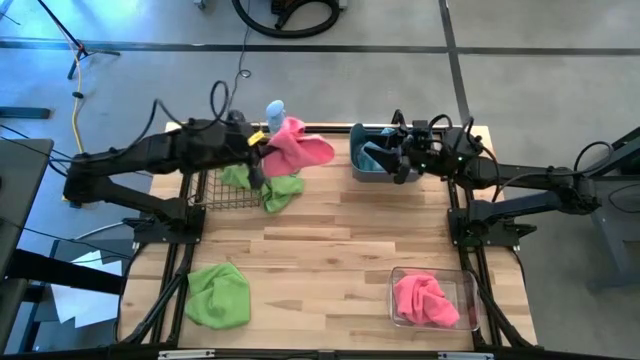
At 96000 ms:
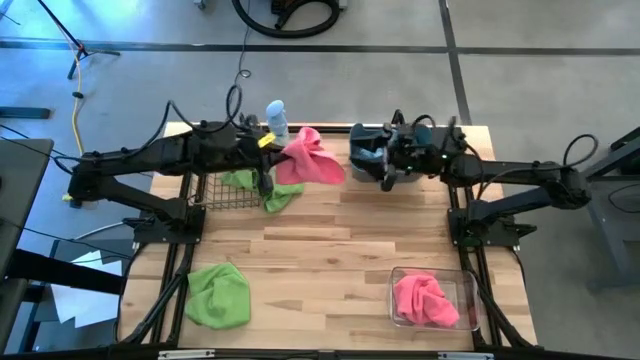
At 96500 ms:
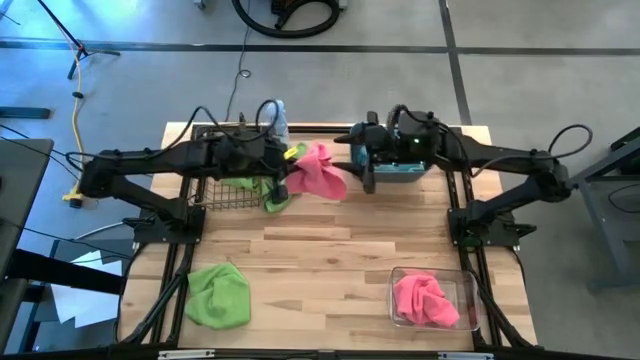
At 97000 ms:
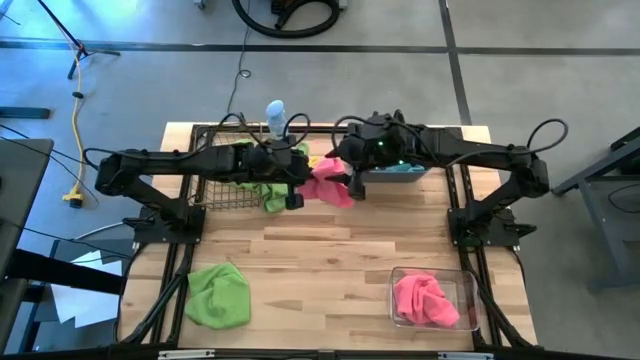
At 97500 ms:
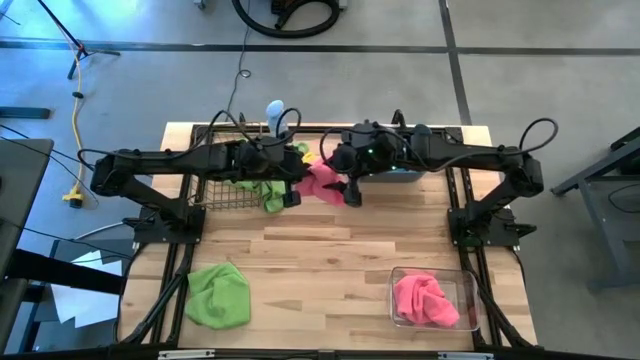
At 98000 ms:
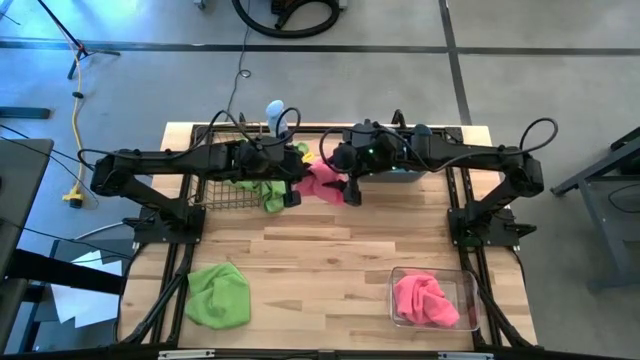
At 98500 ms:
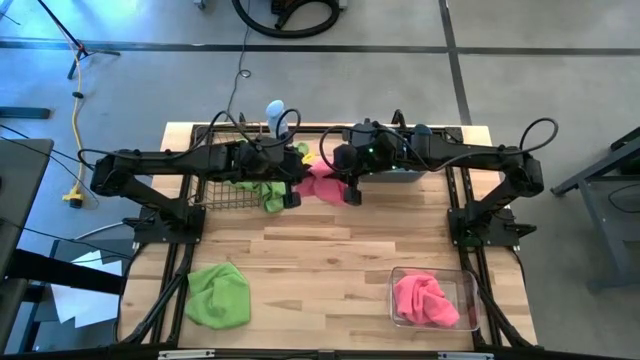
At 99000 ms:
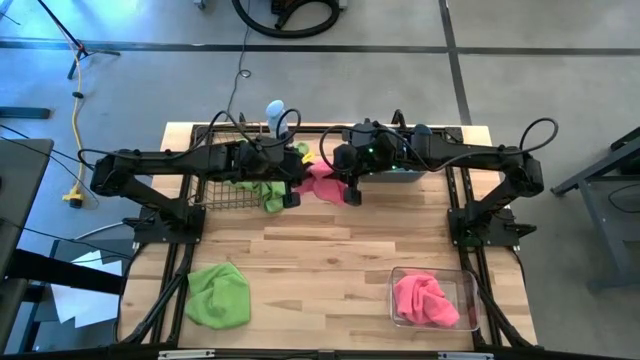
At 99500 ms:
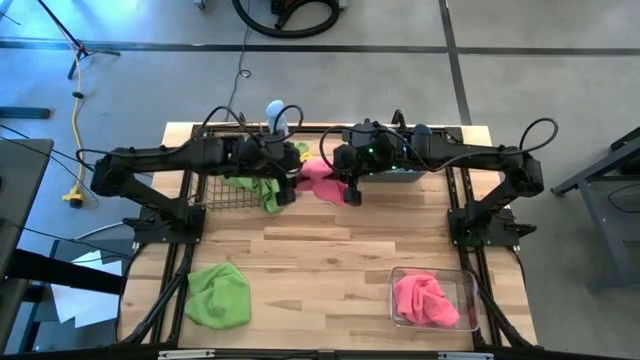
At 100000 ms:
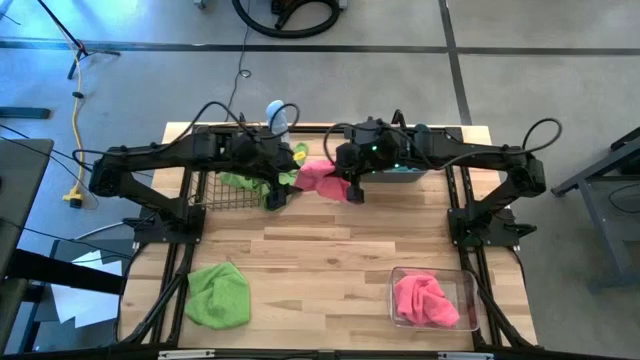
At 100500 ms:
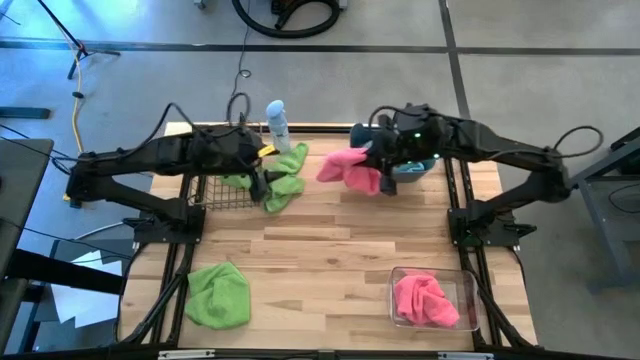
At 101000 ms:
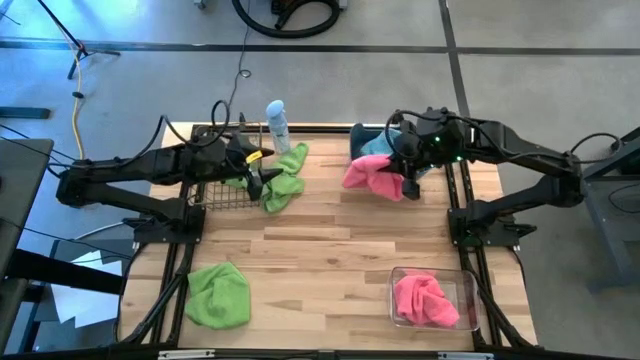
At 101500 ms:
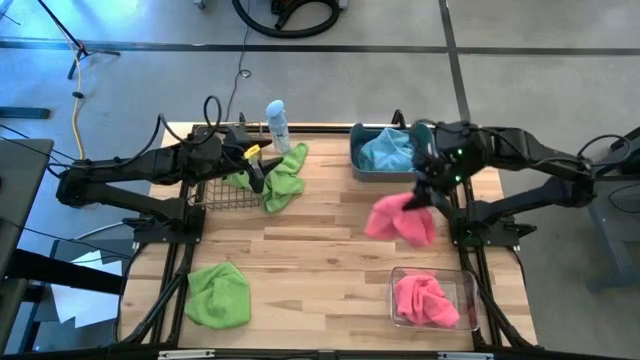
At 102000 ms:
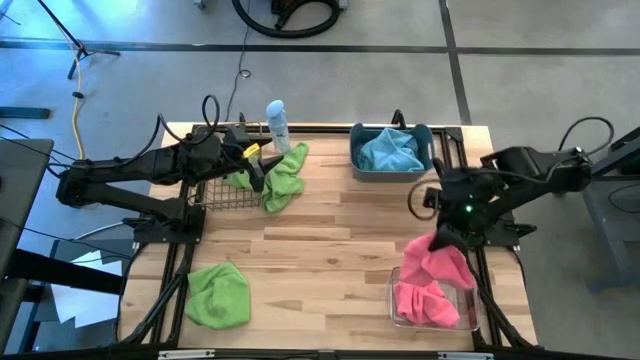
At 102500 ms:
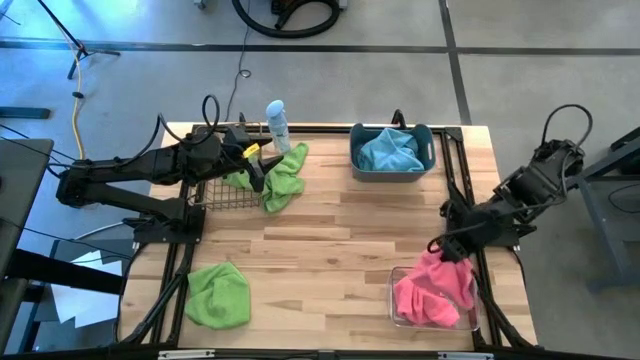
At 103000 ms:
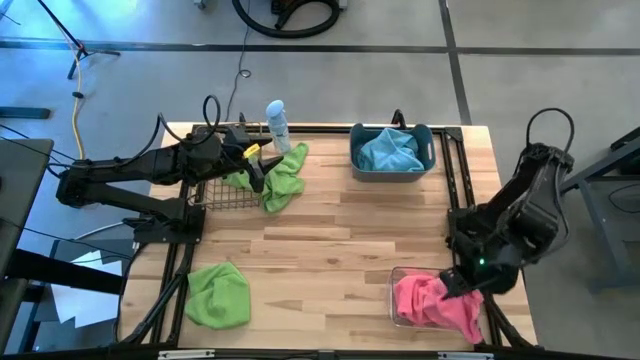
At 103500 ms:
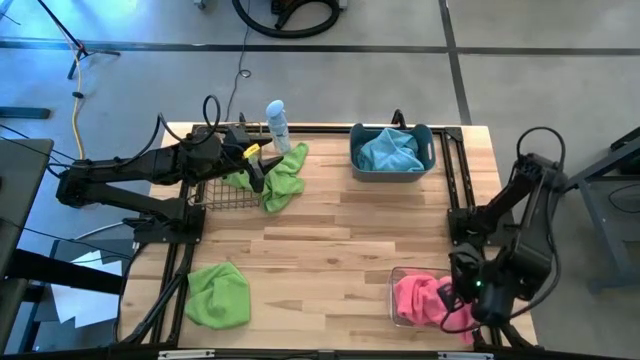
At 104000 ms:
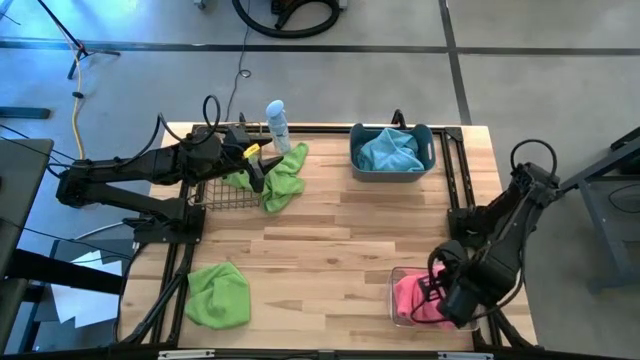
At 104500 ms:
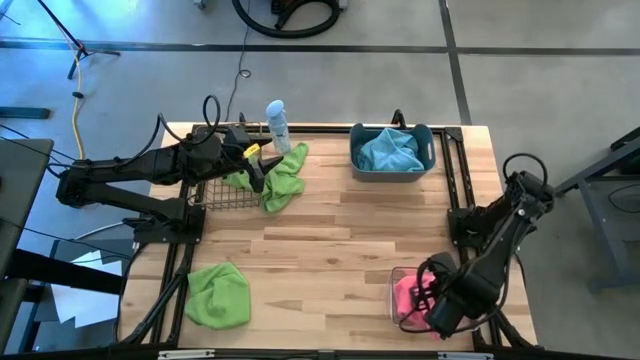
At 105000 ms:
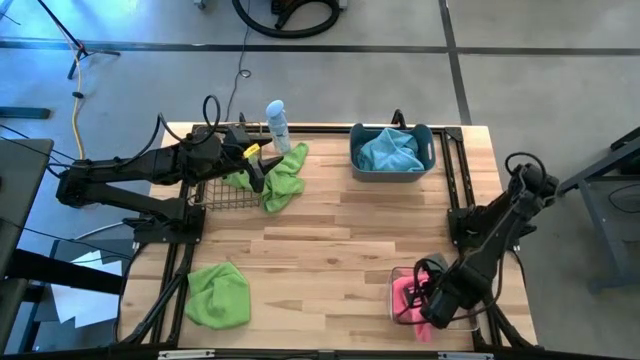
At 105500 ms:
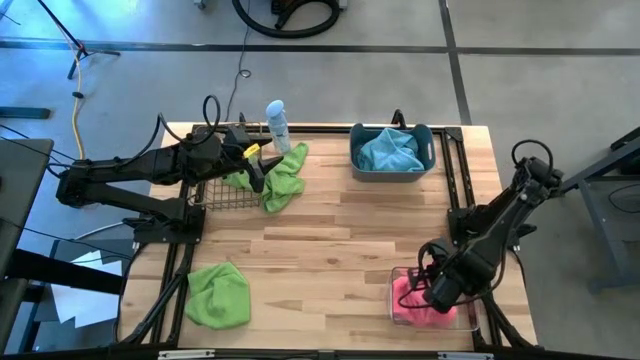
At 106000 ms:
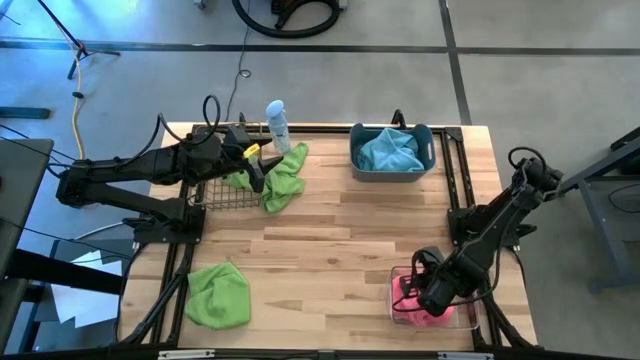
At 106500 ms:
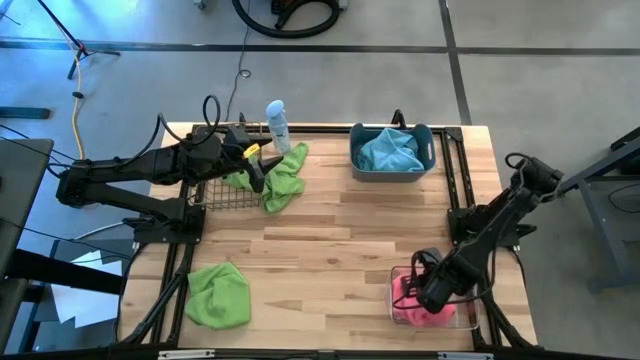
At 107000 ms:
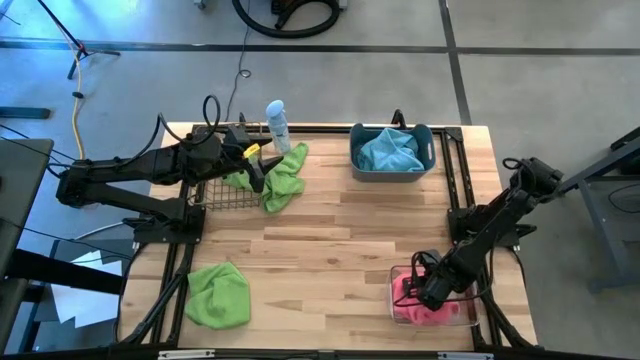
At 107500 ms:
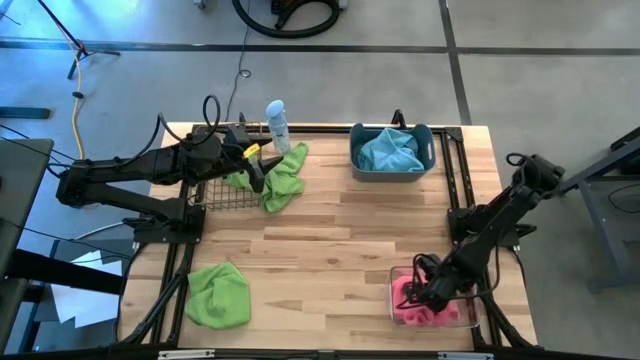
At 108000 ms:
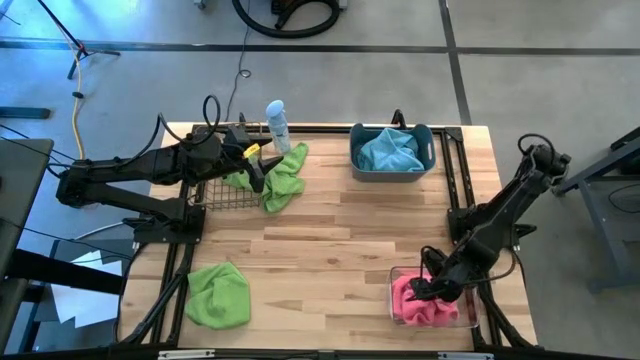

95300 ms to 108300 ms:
Task: Sort microfiber towel by color & place in baskets
Put the pink towel into the transparent bin

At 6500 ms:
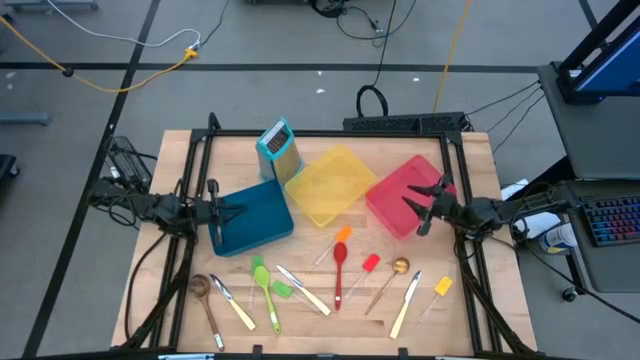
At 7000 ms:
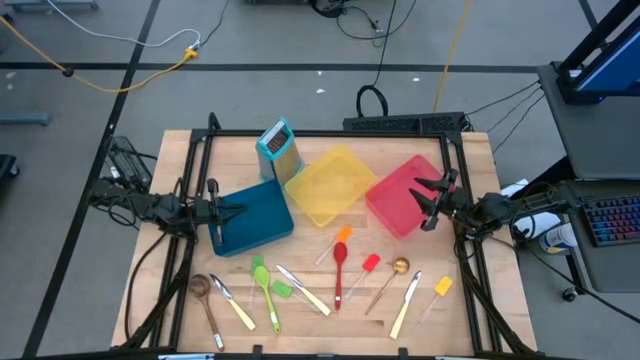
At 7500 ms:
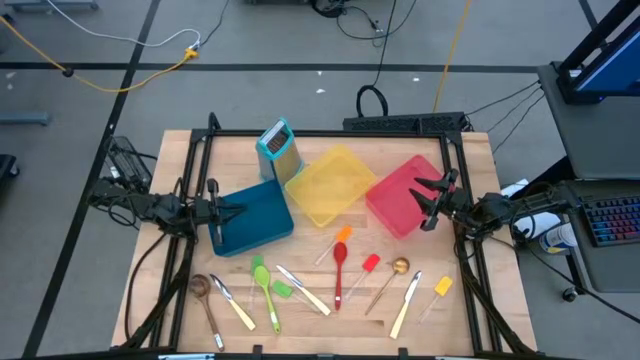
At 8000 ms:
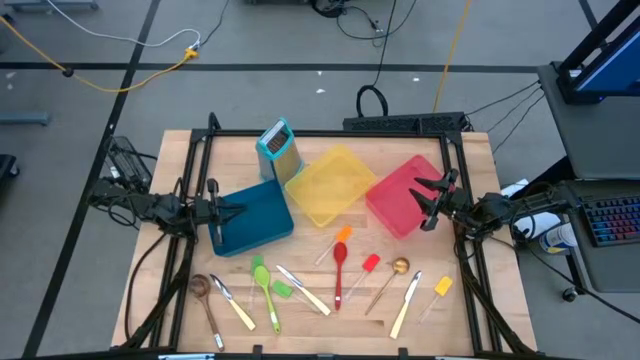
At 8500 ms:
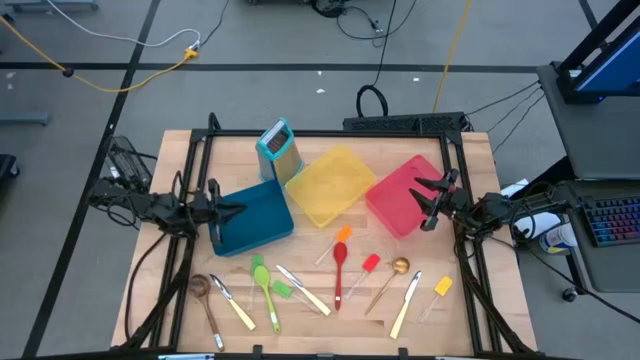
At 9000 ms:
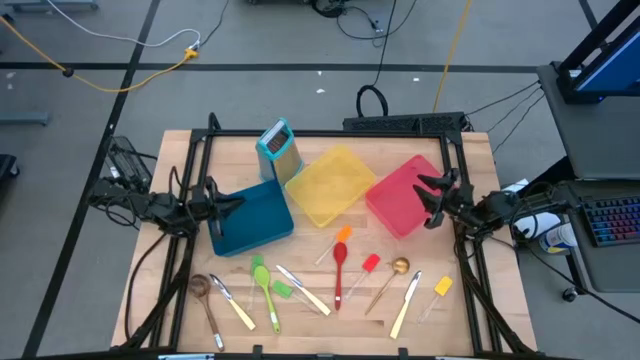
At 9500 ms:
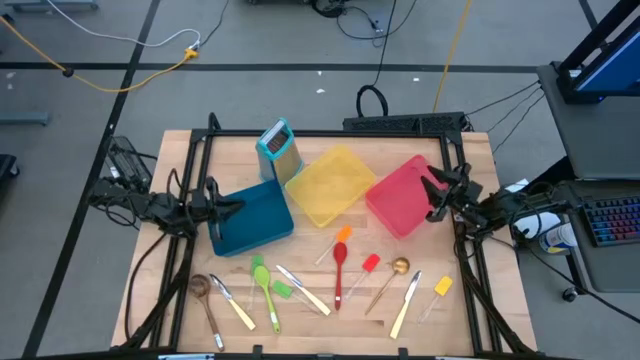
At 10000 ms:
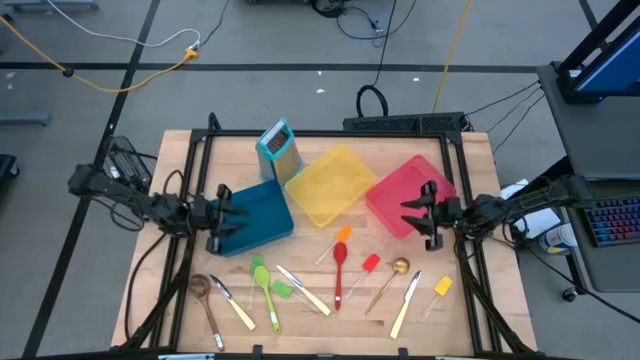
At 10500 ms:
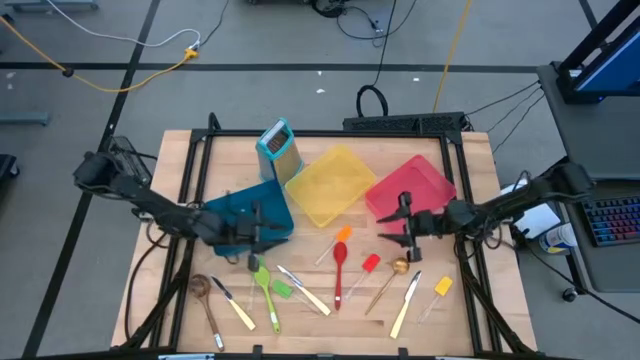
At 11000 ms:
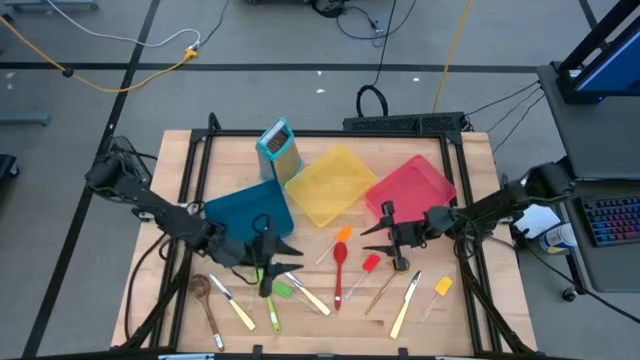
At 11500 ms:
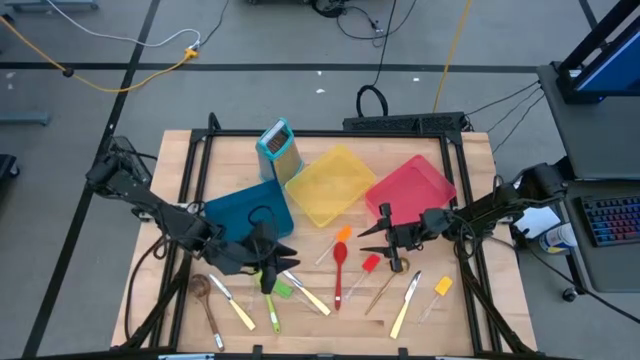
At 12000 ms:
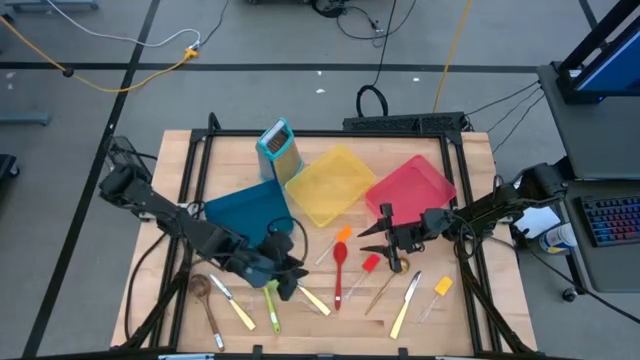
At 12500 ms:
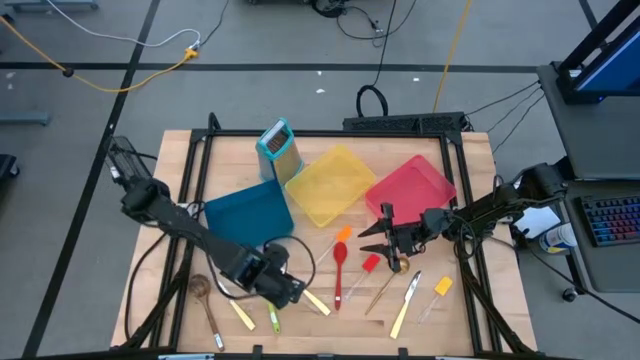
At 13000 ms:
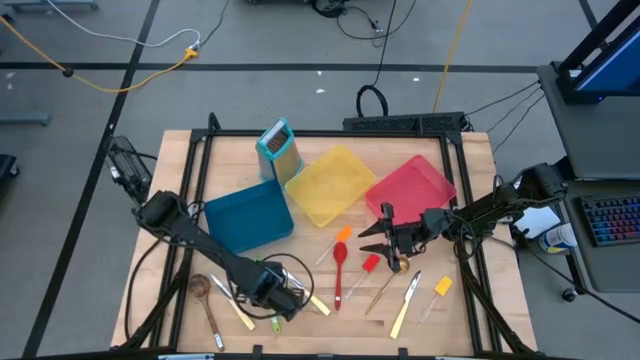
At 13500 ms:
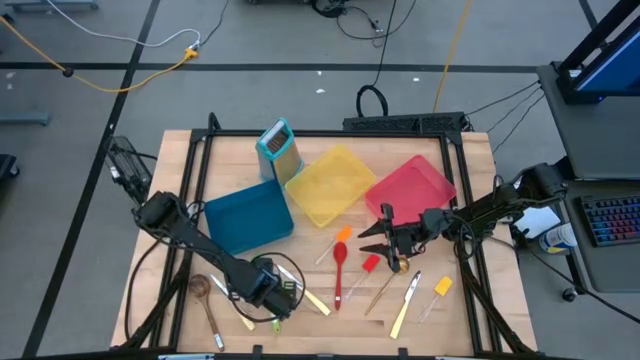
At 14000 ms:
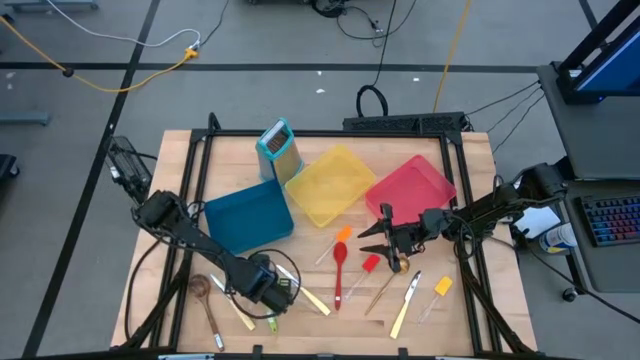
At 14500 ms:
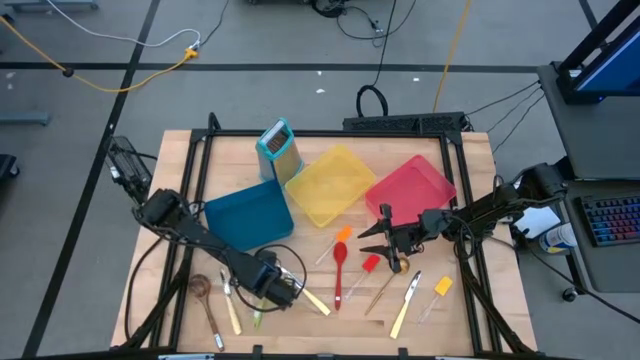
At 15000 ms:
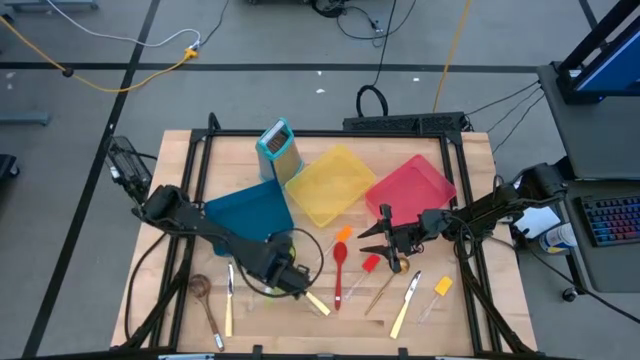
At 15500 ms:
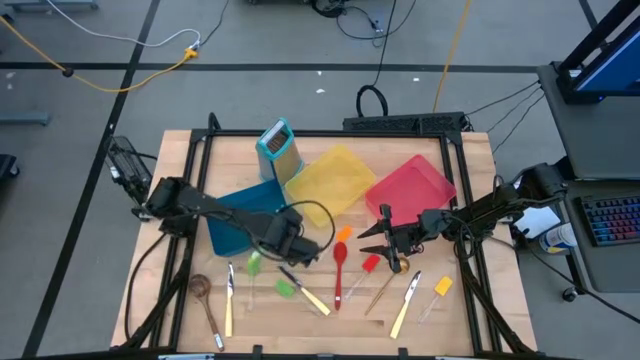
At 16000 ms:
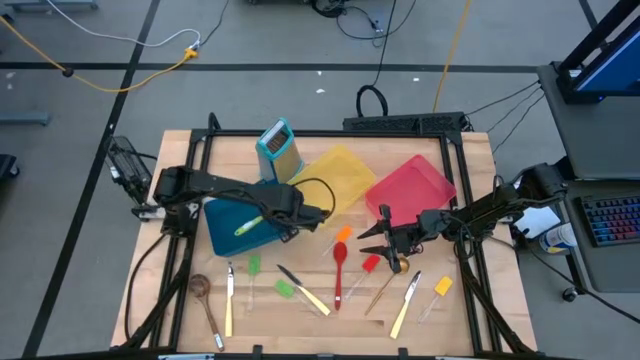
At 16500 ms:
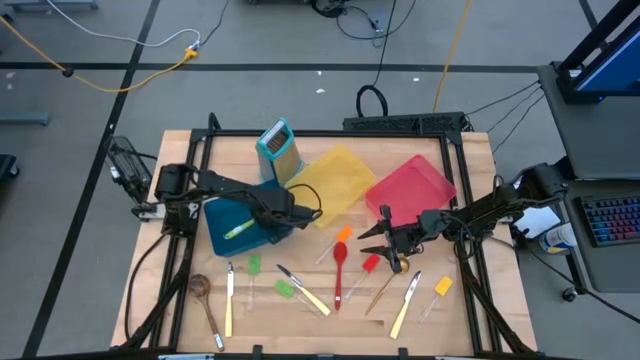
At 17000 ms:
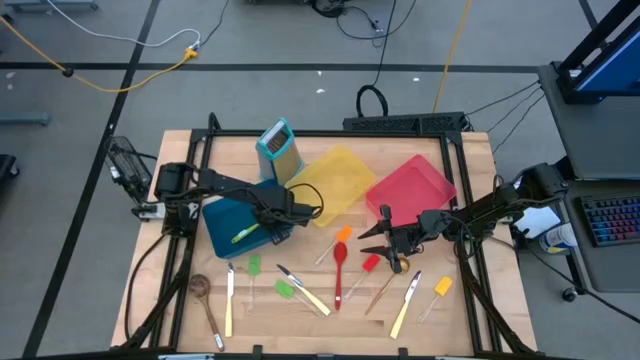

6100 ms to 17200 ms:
Task: Pick & Place Kitchen Items
Put the green serving spoon into the blue bin
